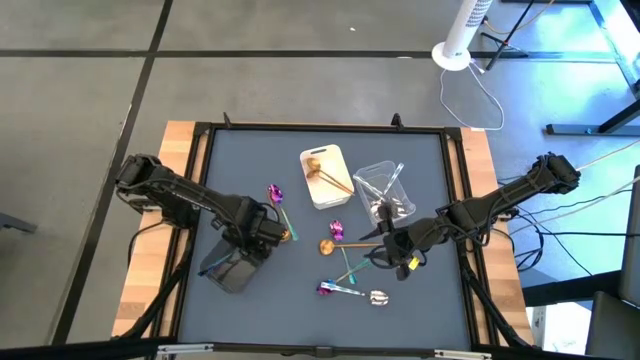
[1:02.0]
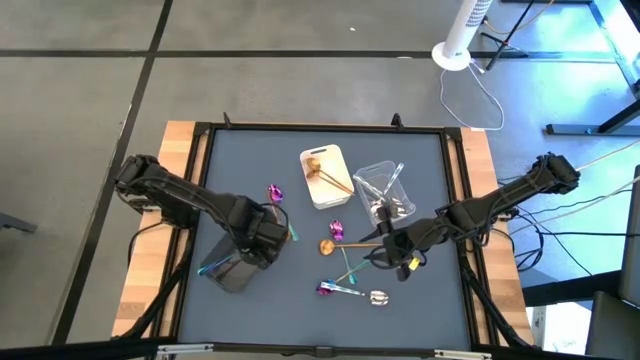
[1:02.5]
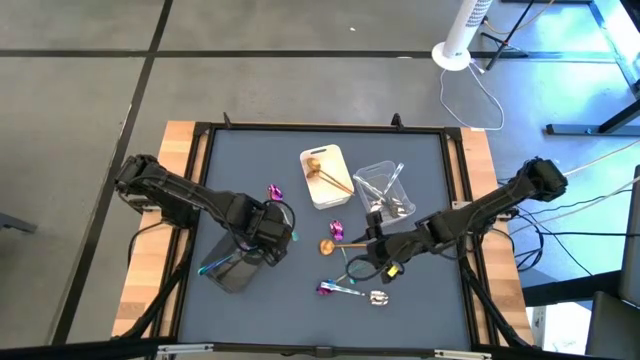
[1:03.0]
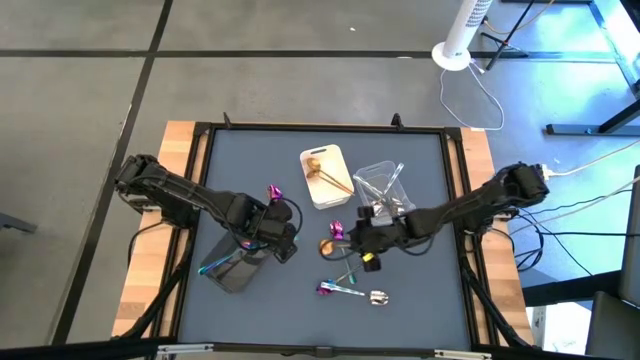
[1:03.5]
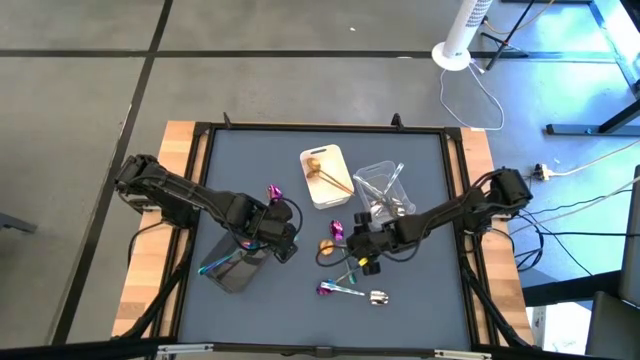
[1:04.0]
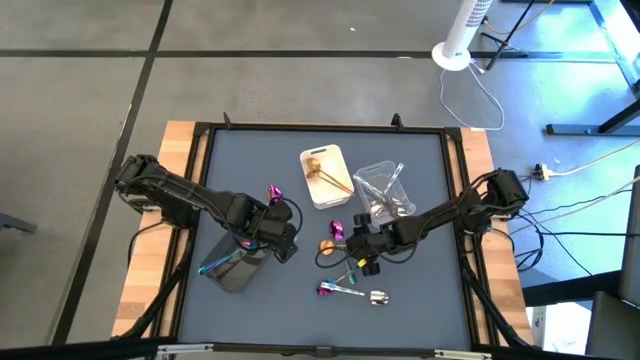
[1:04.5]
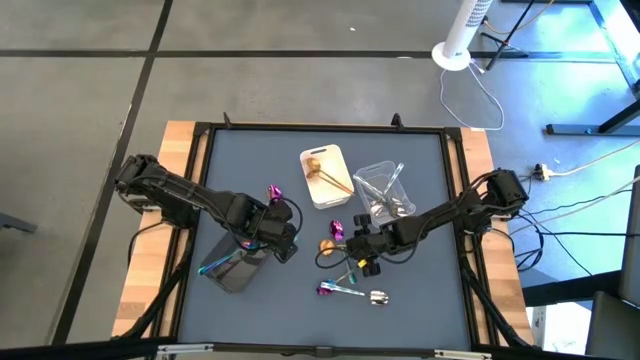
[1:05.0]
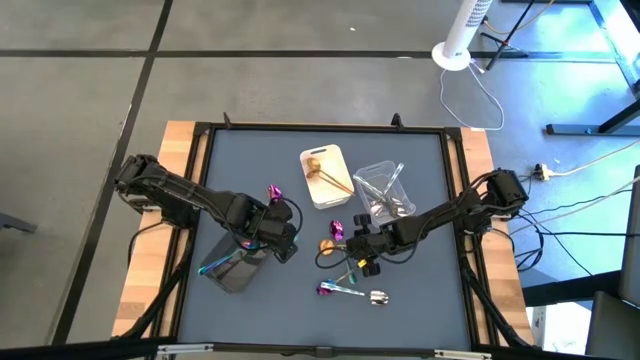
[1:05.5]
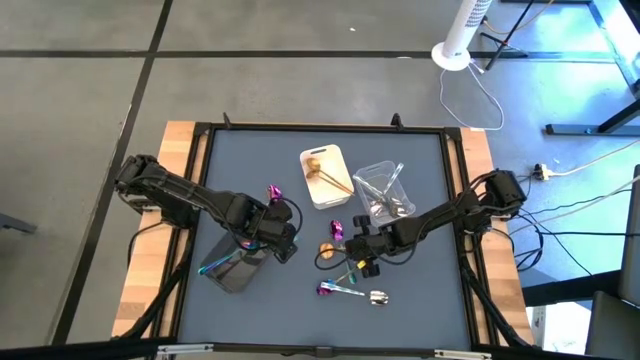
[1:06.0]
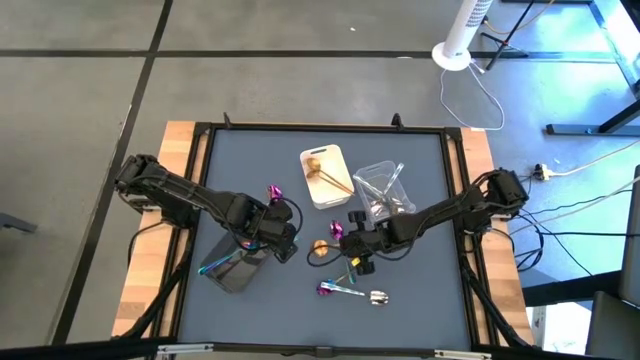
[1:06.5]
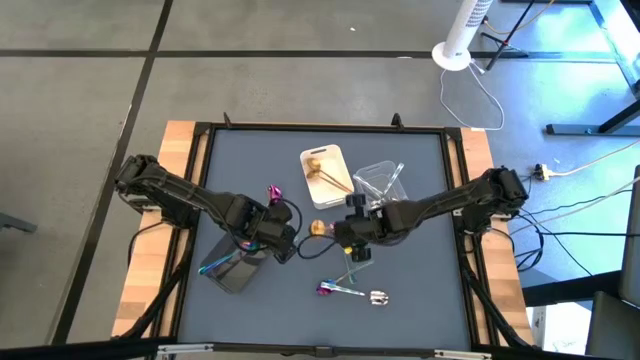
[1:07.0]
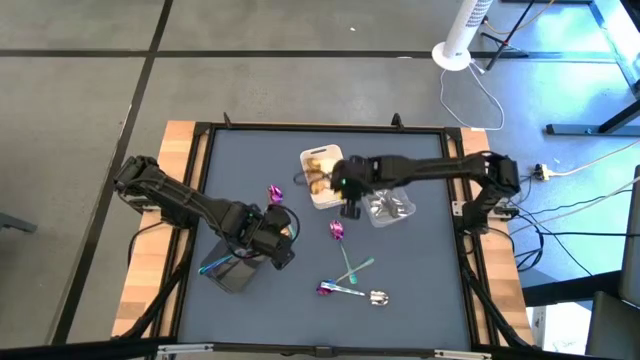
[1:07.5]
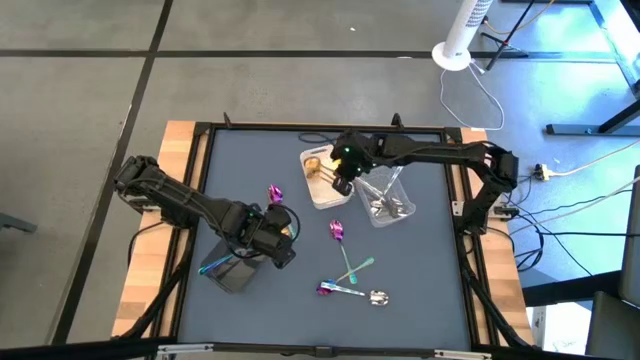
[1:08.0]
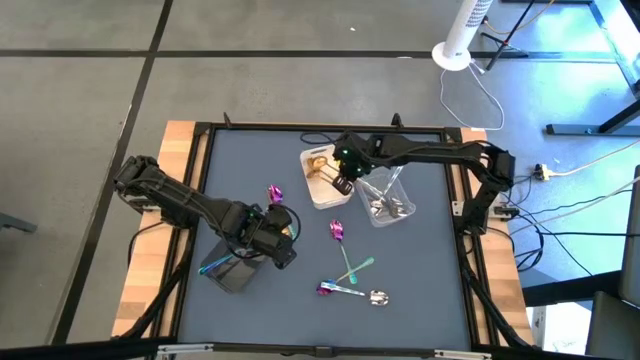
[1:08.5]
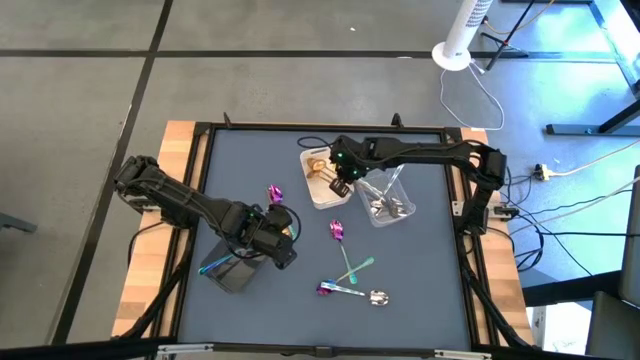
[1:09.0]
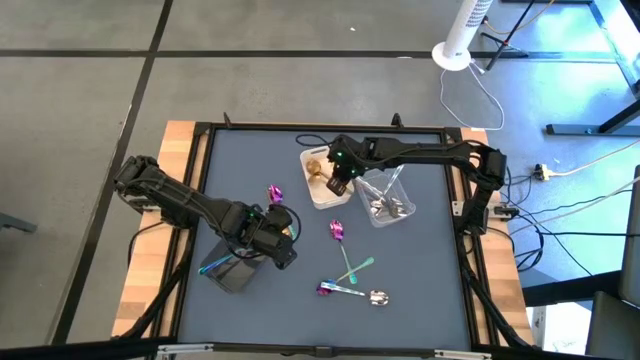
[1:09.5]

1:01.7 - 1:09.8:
Task: Sort silverware by color (type)
Put the gold spoon into the white bin

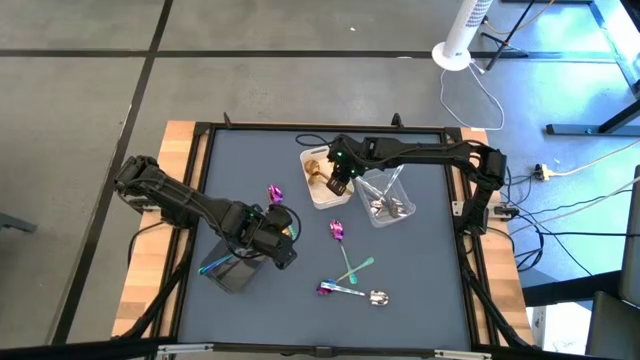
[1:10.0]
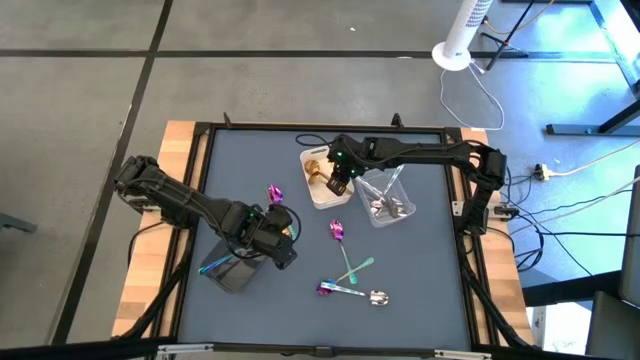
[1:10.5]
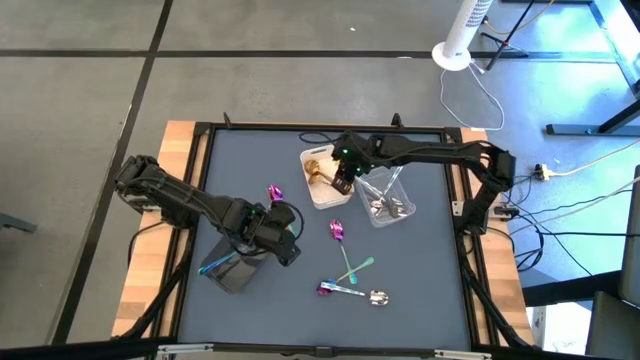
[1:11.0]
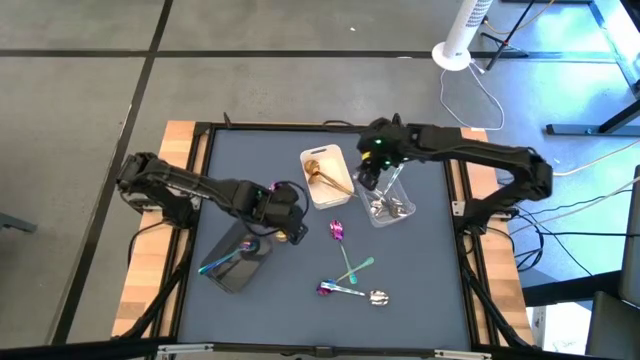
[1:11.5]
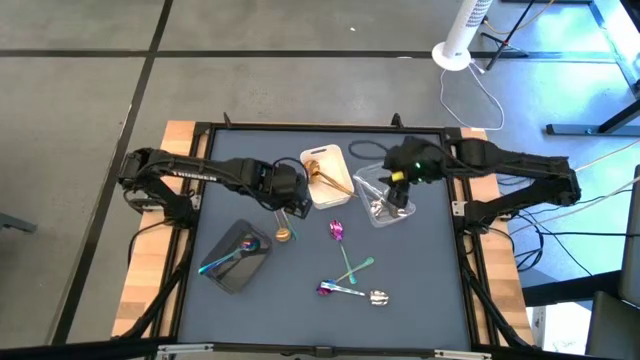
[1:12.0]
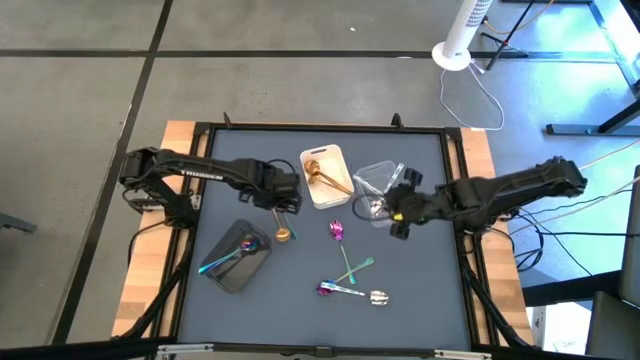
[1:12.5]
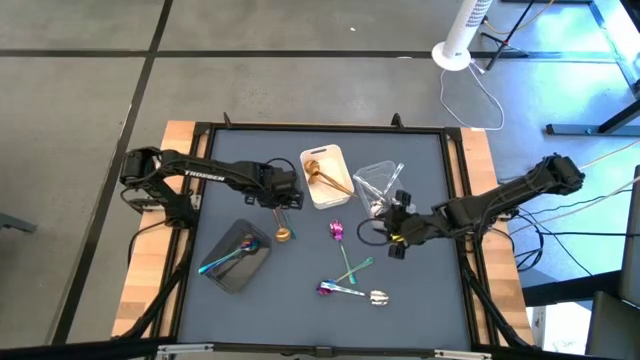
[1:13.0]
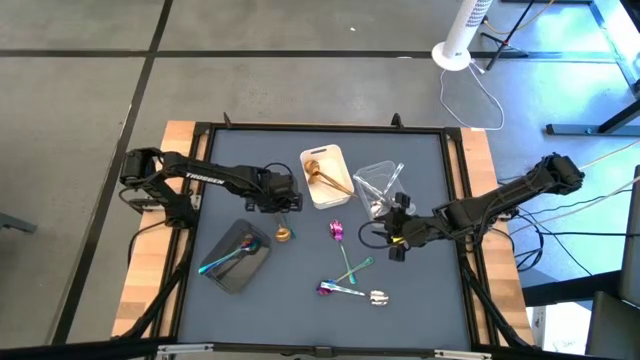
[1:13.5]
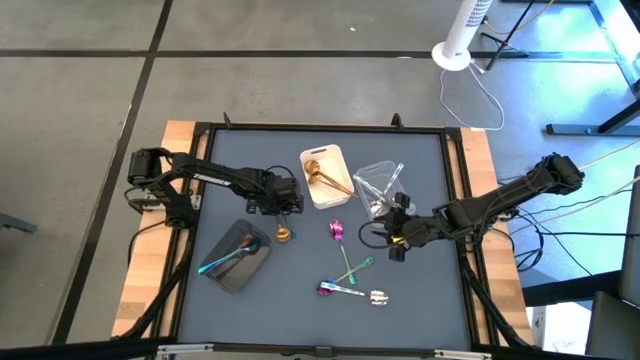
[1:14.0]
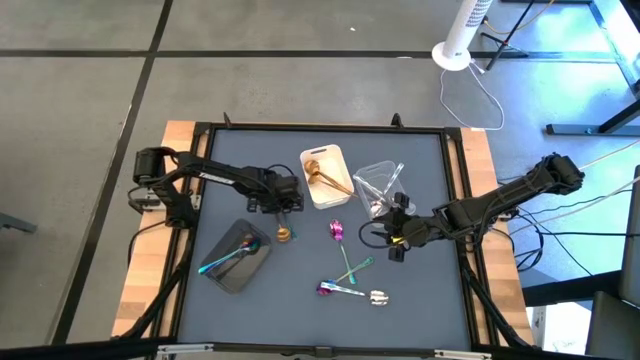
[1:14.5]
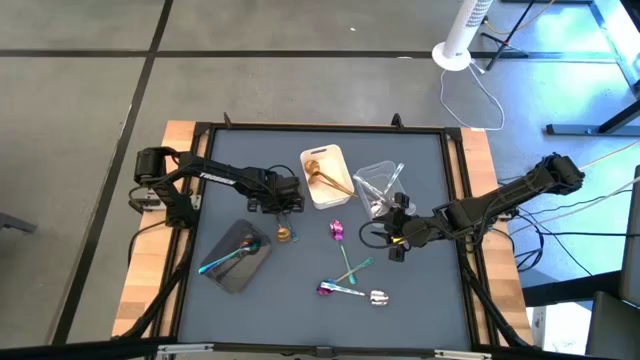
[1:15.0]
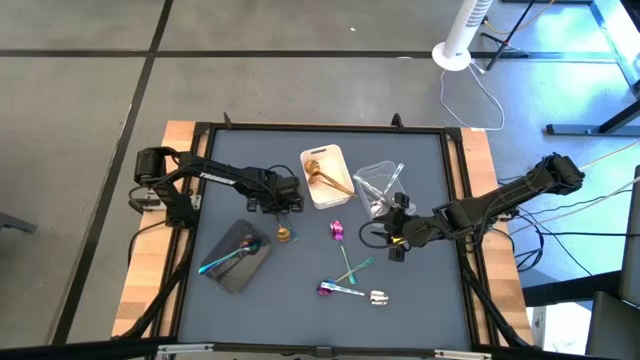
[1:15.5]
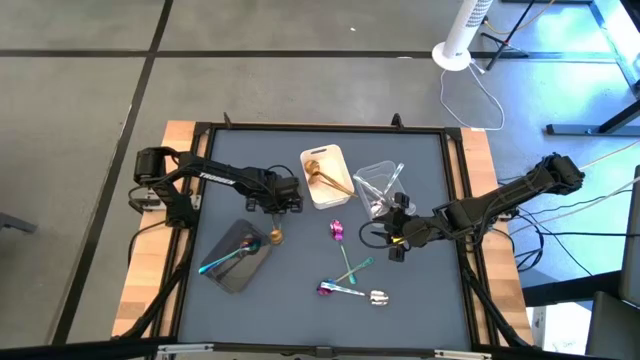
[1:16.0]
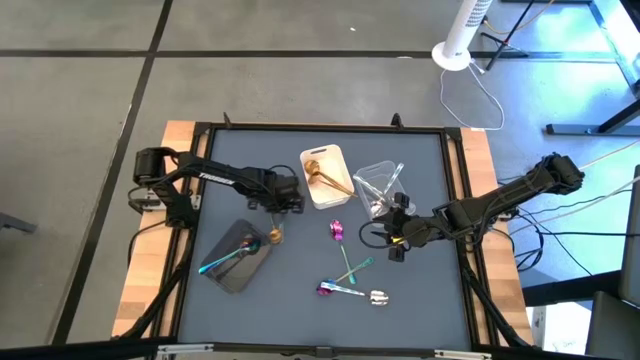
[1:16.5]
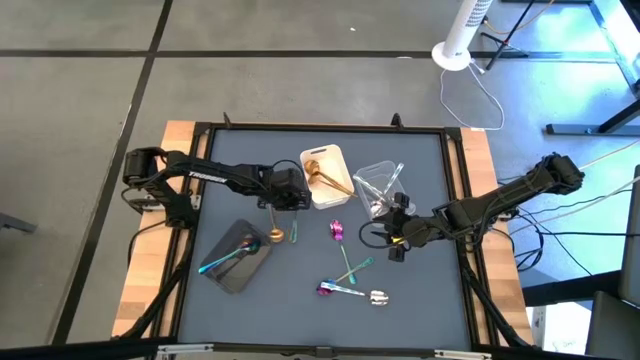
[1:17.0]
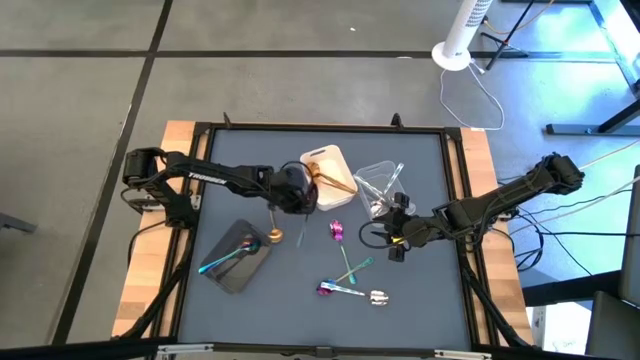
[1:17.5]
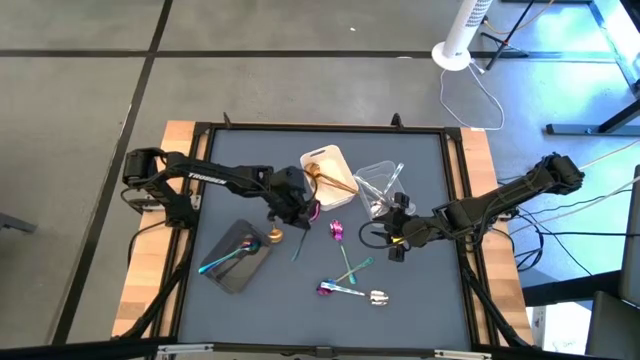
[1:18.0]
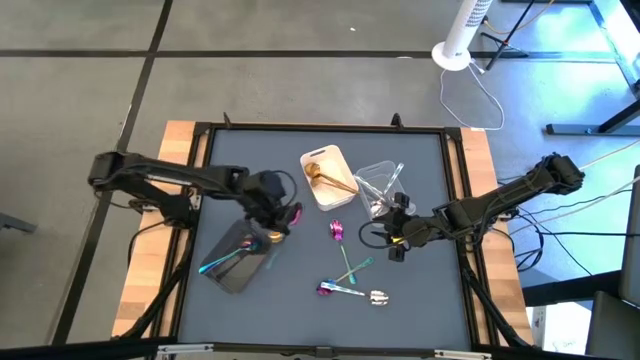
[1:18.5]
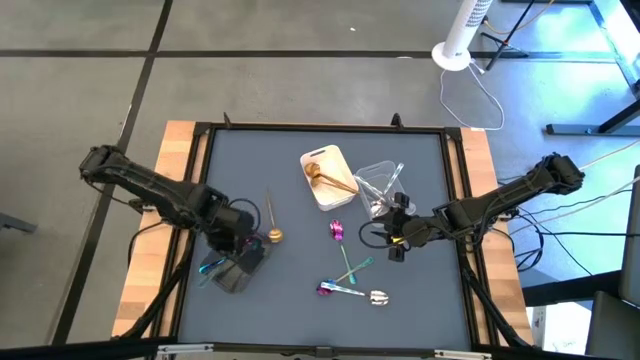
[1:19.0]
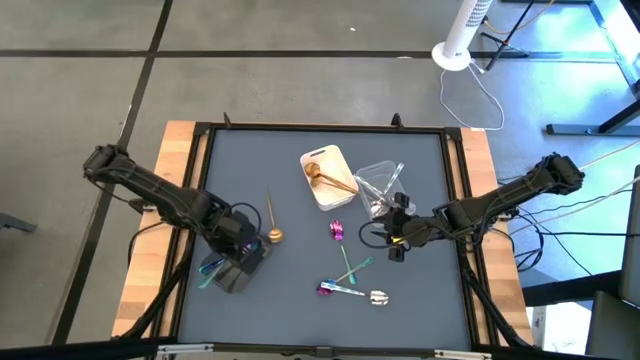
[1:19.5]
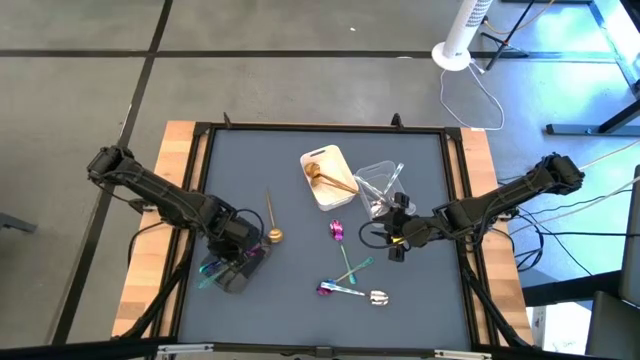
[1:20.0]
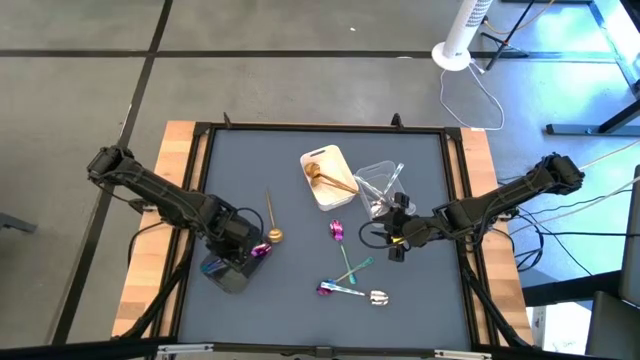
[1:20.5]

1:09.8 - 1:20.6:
Put the iridescent spoon into the black bin

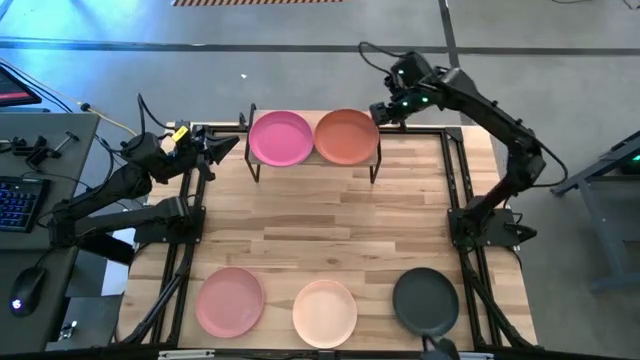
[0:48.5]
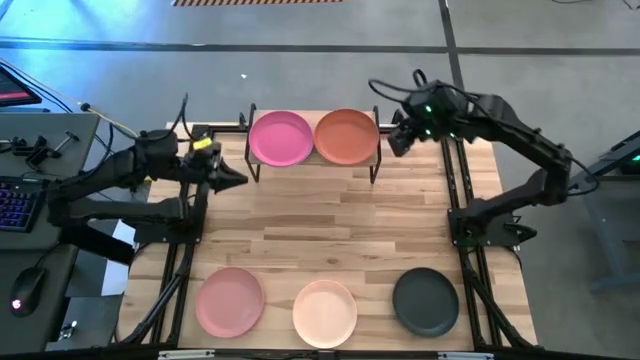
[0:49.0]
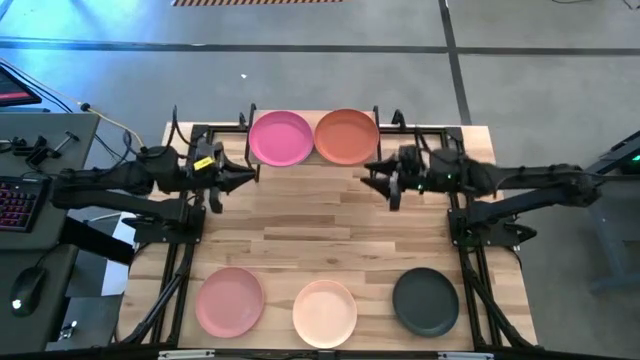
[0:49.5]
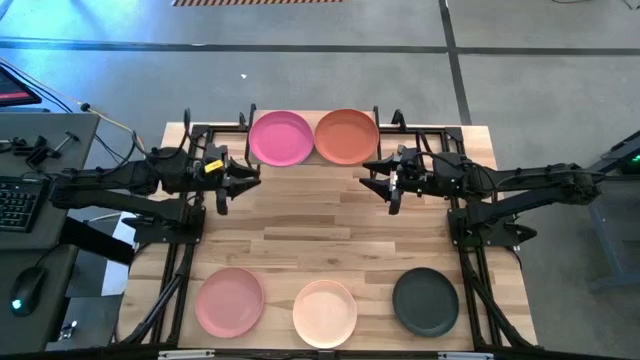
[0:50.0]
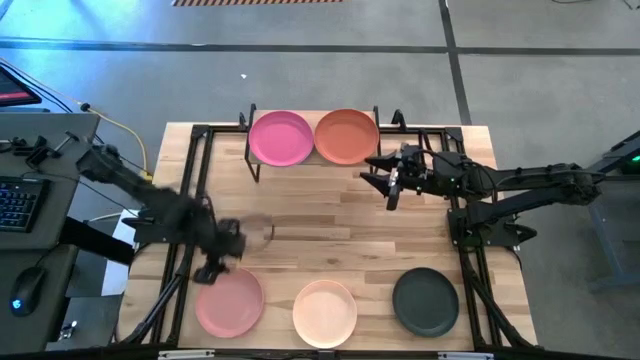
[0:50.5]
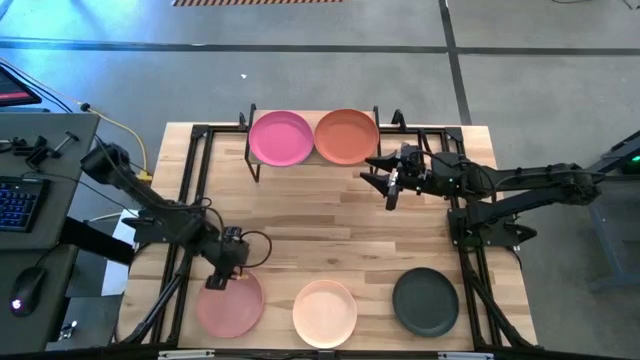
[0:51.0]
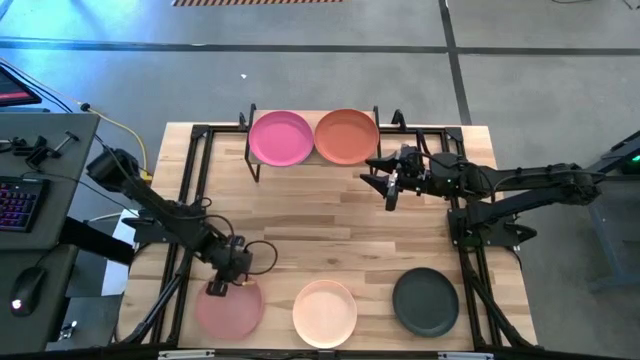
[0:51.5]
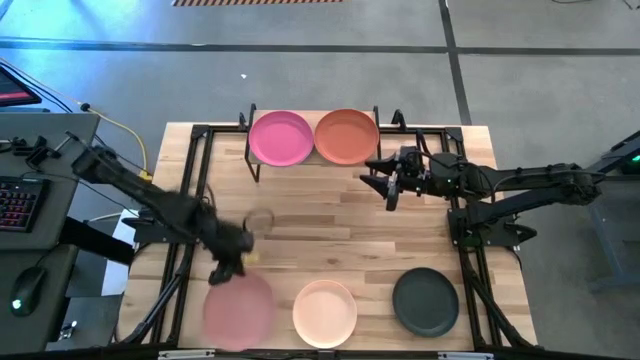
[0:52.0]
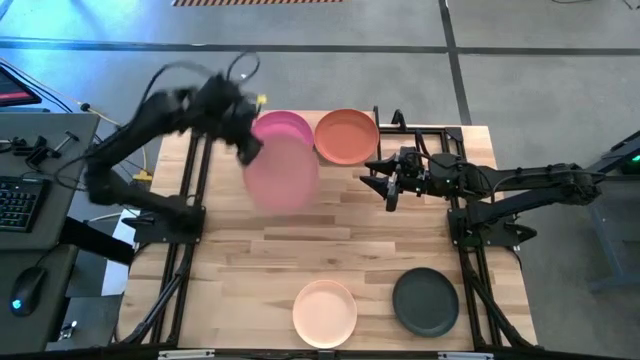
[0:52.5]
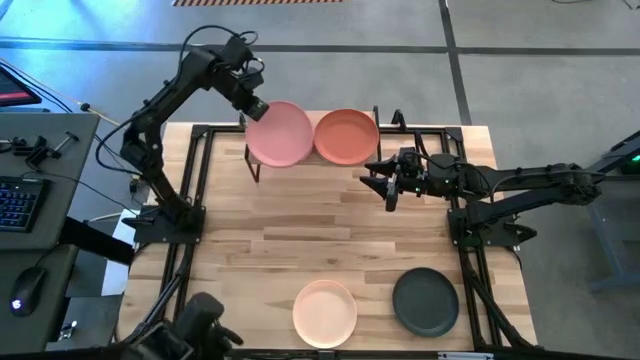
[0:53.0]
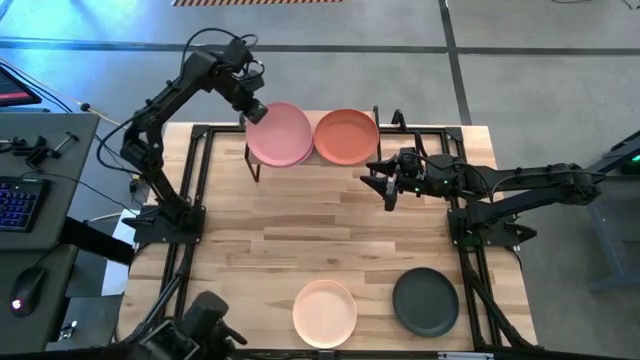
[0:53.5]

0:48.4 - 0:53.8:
Task: Place and stack plates onto a shelf
Stack the light pink plate on top of the pink plate on the shelf
